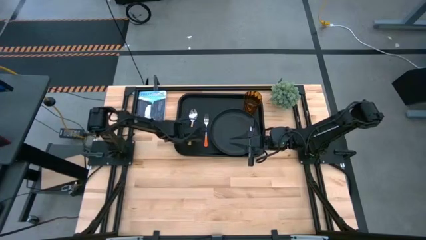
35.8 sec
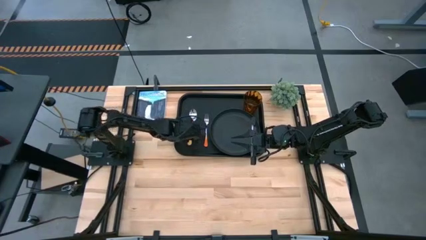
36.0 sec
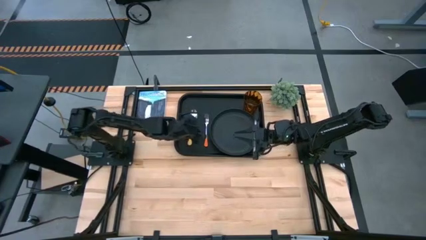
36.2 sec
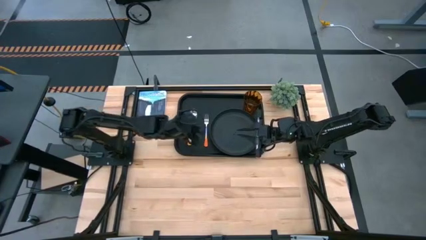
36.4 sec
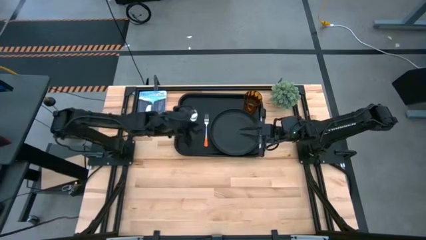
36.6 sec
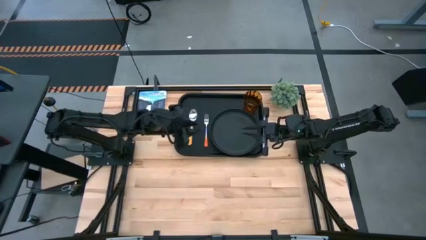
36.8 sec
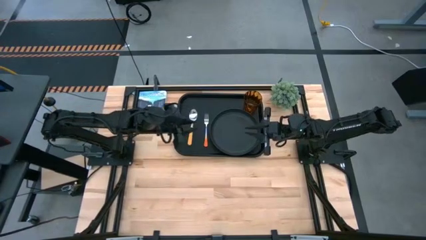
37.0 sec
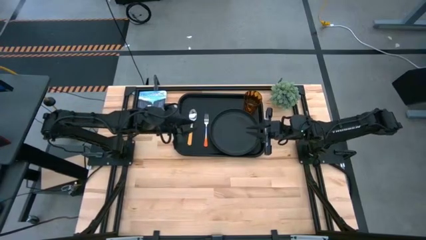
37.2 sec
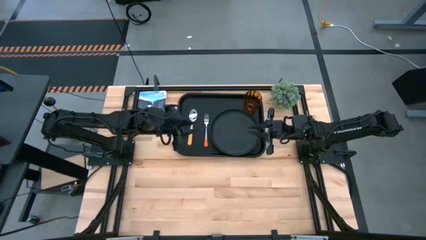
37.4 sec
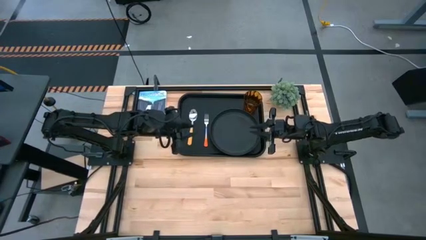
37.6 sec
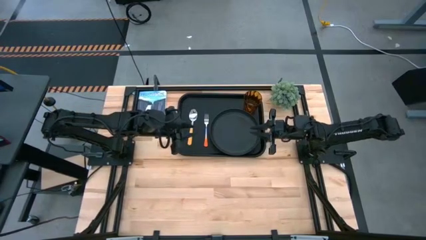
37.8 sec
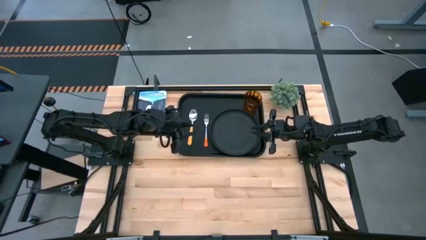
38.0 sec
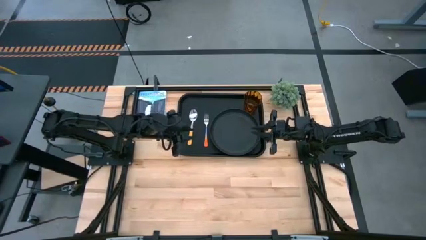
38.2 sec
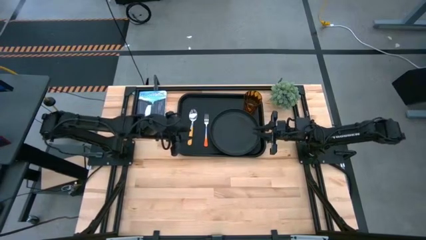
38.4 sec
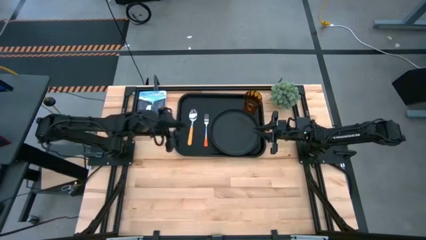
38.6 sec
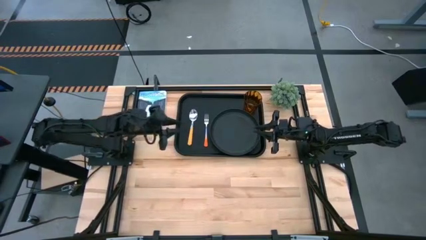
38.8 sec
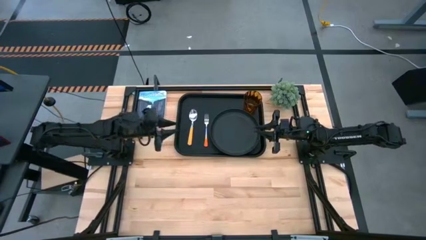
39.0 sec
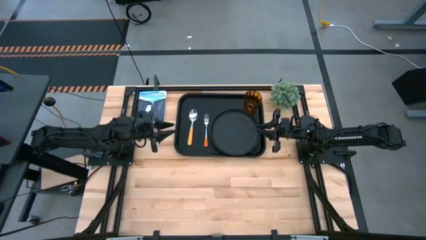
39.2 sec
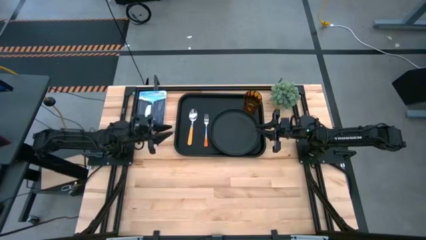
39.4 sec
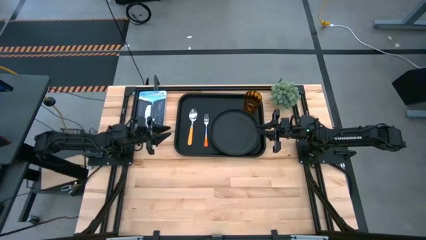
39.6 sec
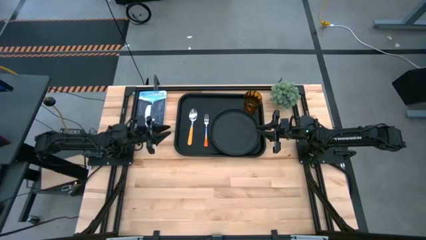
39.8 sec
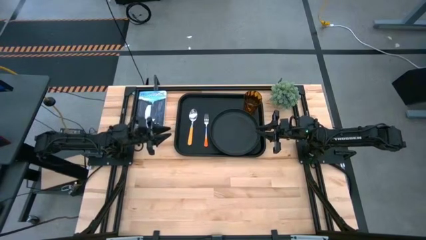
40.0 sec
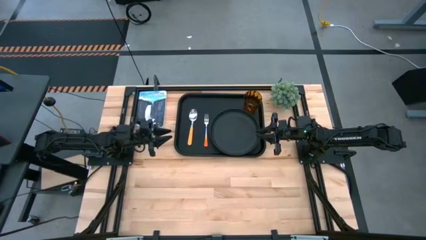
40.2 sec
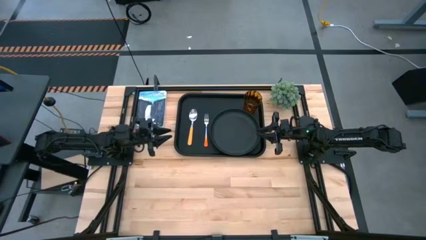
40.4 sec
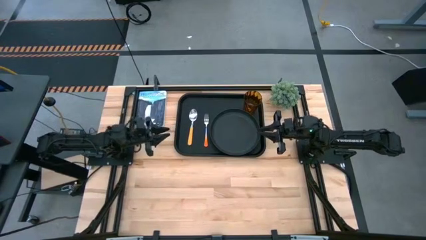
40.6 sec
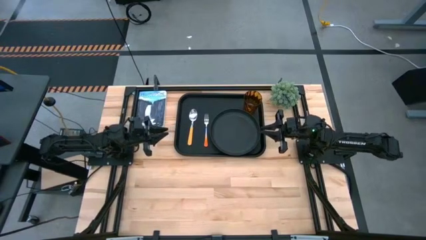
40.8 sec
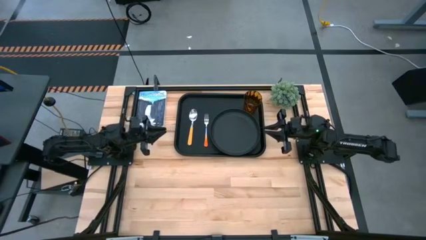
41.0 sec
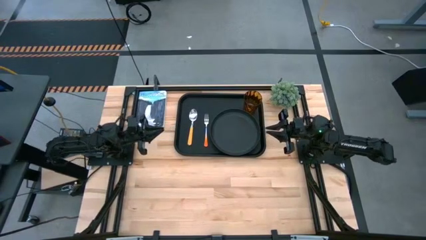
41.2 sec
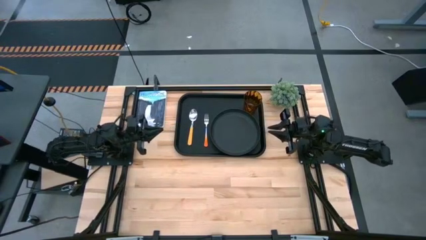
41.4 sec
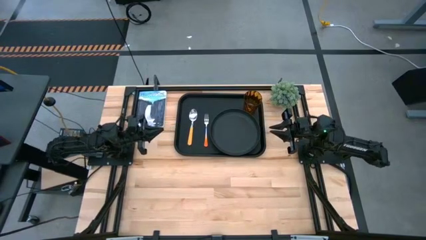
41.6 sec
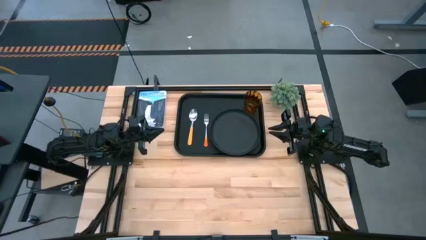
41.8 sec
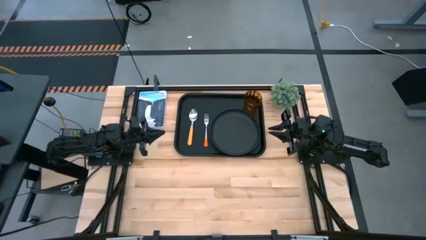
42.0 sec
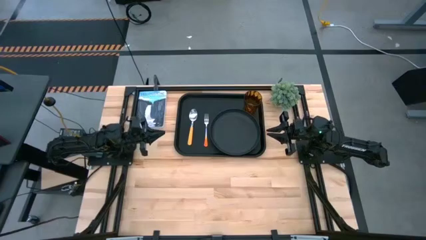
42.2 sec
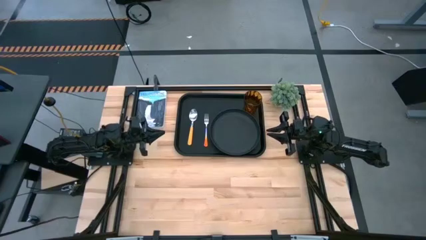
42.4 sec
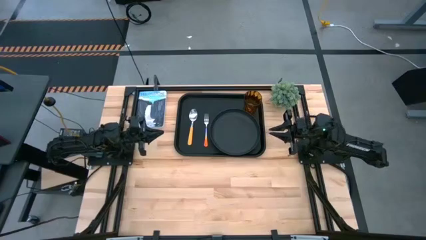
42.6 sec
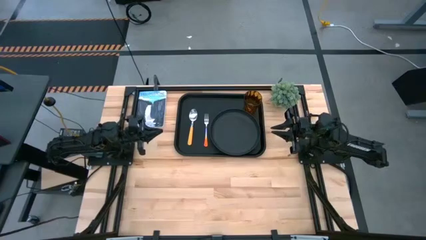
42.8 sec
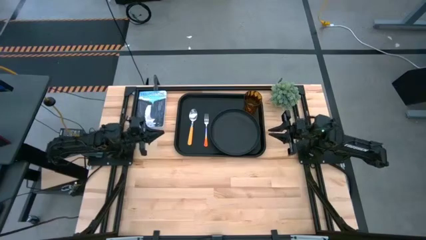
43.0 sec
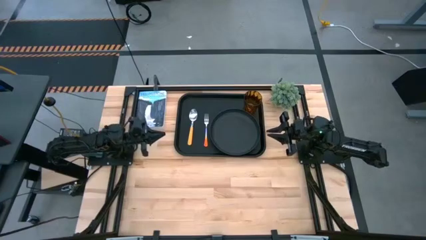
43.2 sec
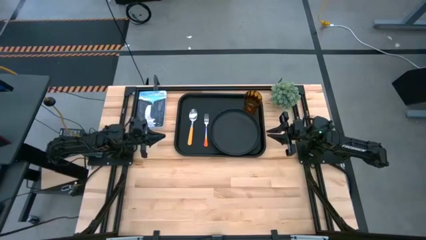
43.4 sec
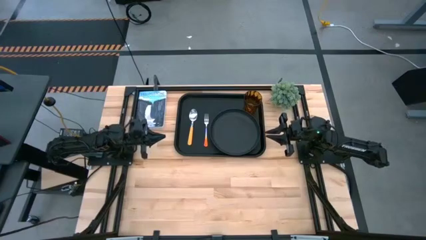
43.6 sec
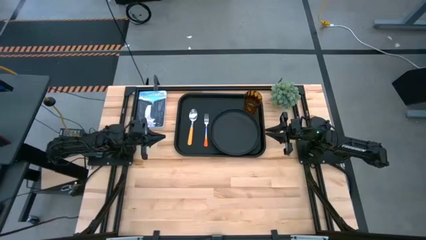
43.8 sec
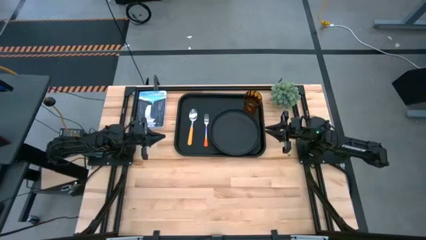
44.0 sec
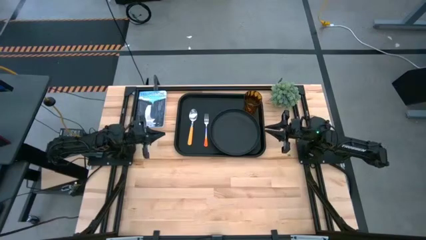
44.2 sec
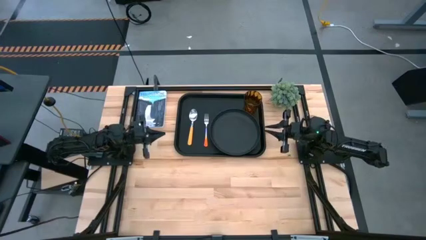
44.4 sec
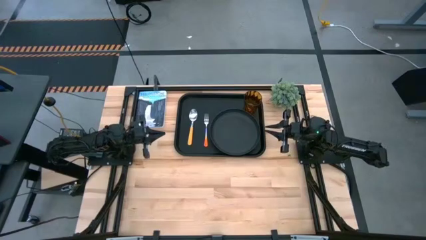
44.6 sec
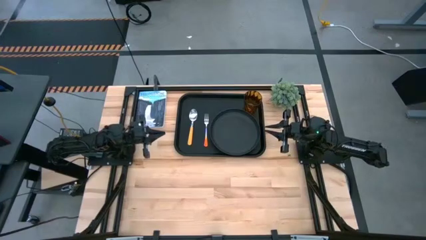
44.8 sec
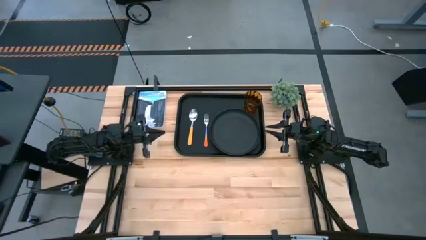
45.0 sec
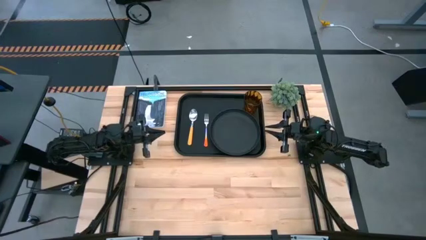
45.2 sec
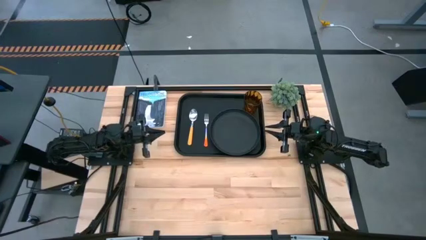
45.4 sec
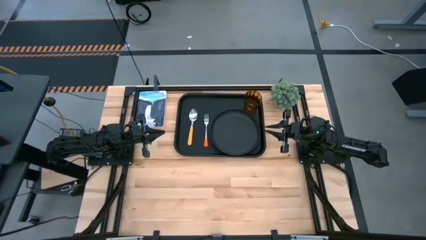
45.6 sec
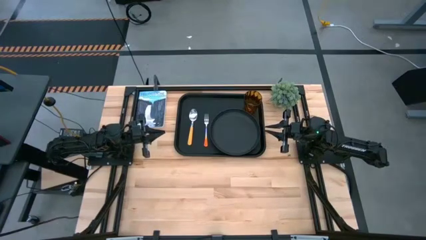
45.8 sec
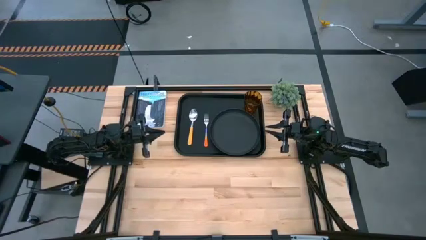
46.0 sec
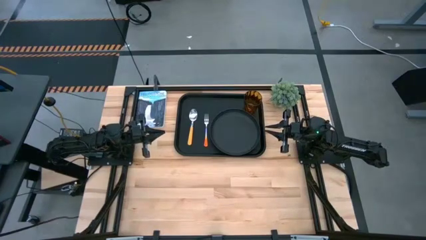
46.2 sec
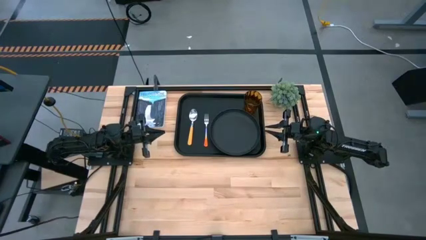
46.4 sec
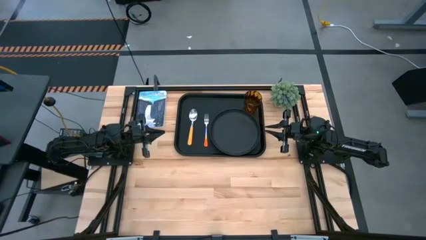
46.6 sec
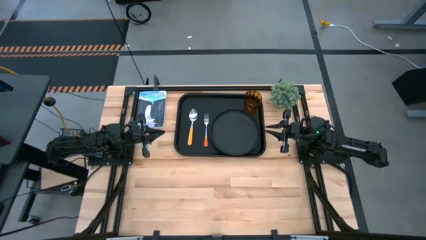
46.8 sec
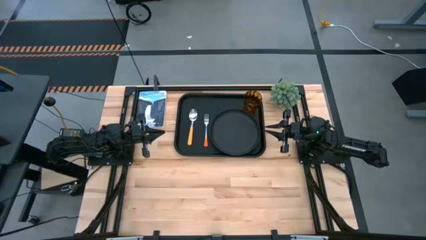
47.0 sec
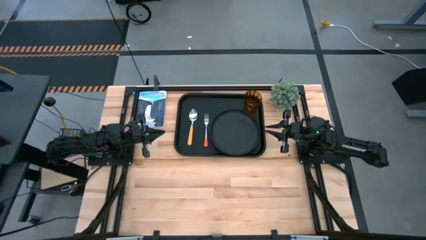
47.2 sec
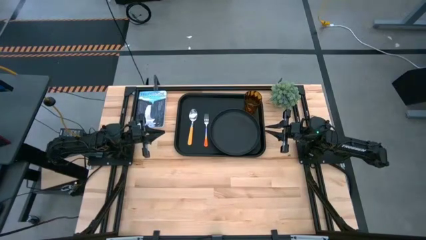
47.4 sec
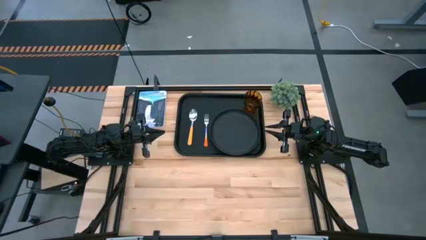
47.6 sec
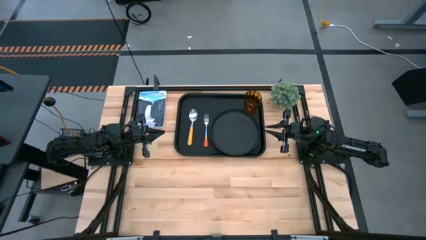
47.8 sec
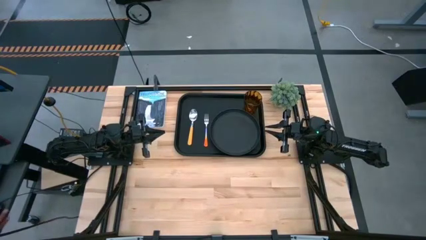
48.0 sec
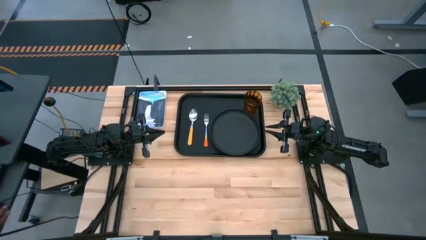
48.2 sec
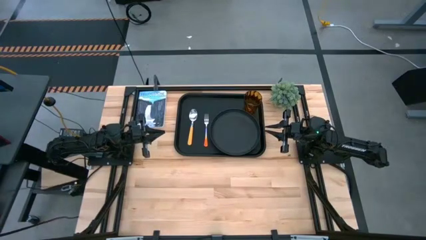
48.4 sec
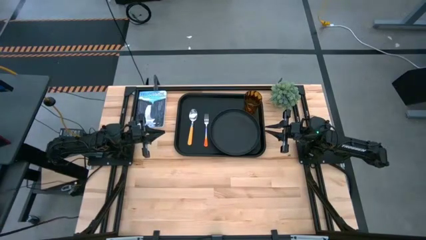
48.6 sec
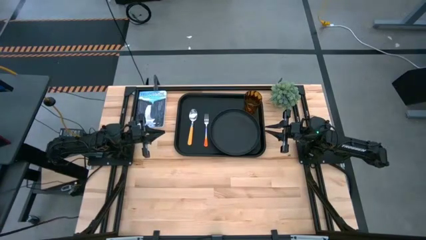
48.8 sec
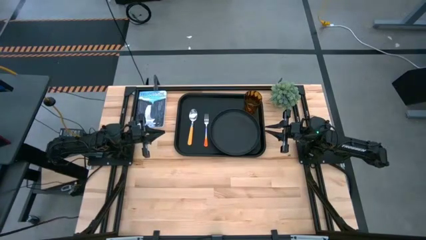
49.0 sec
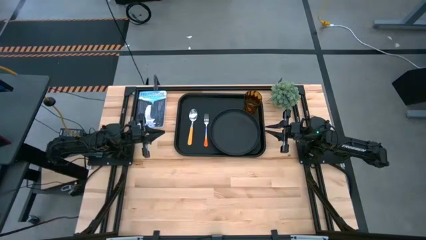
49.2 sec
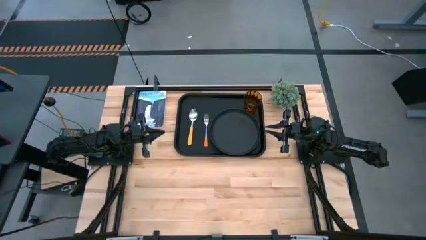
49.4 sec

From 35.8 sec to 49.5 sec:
Task: Pick and place plate/cup/fork/spoon on tray
Return to Home Position

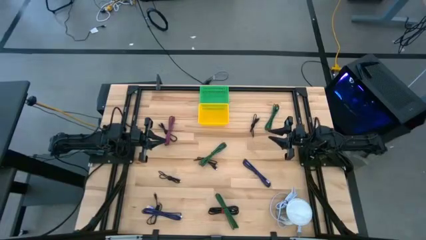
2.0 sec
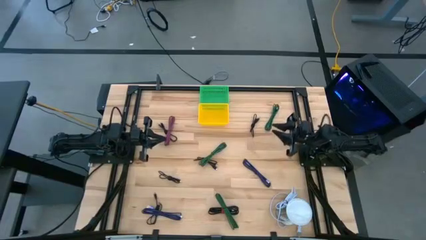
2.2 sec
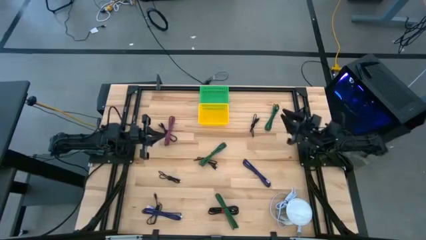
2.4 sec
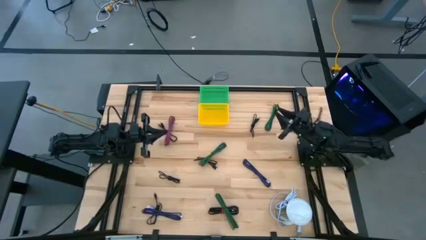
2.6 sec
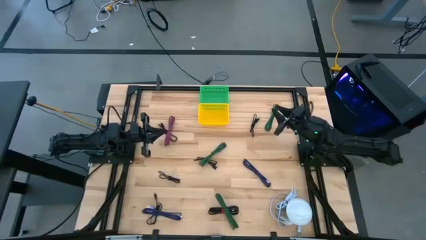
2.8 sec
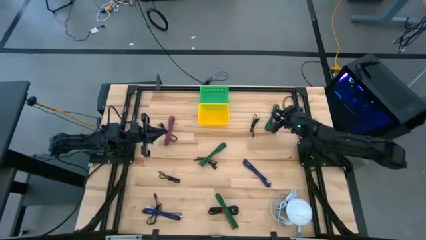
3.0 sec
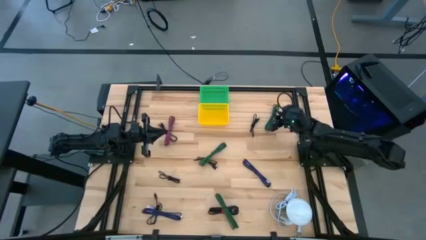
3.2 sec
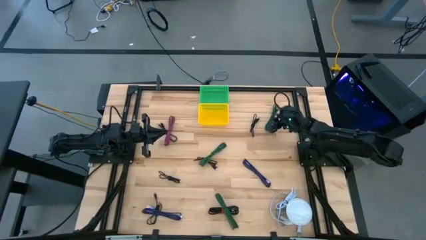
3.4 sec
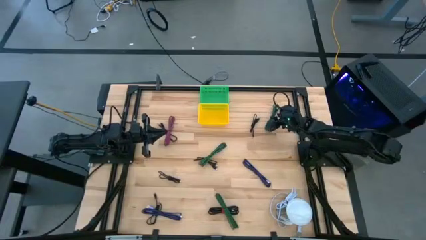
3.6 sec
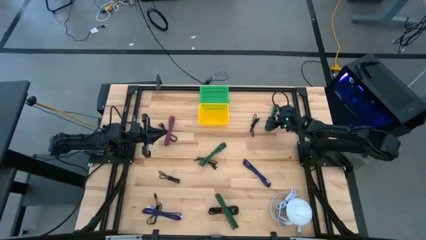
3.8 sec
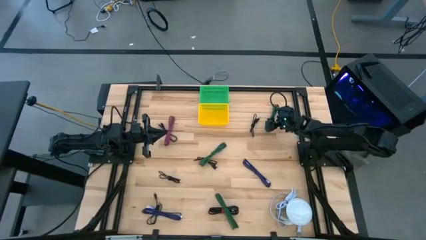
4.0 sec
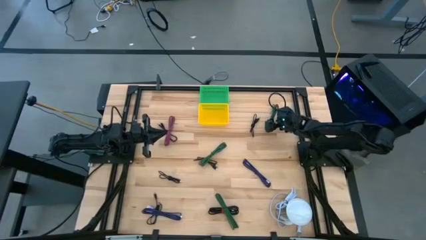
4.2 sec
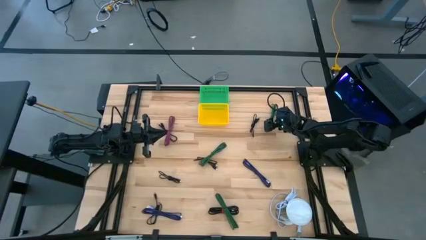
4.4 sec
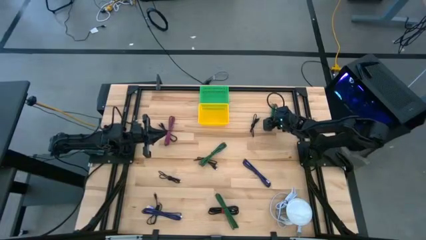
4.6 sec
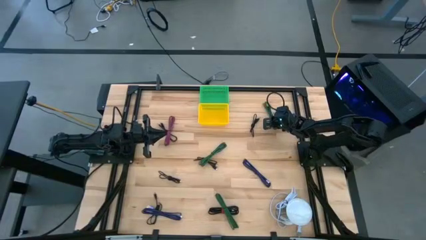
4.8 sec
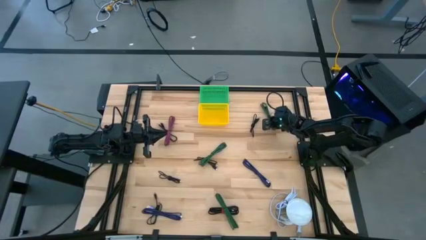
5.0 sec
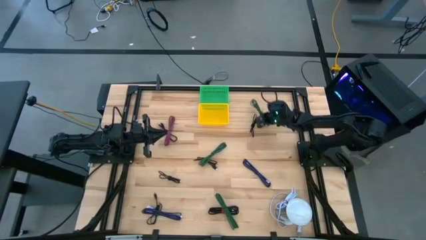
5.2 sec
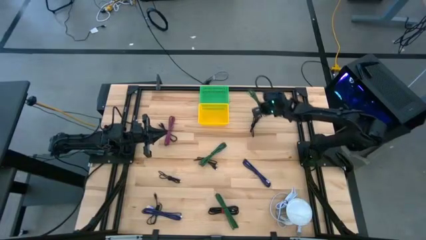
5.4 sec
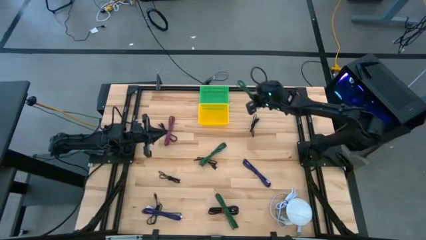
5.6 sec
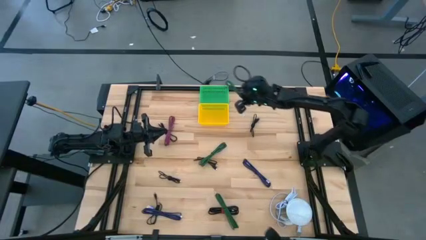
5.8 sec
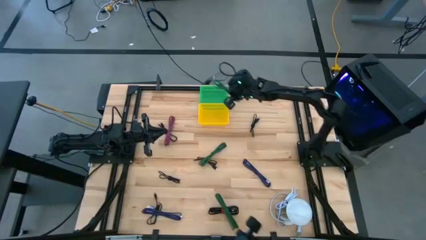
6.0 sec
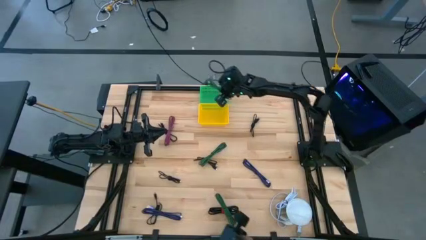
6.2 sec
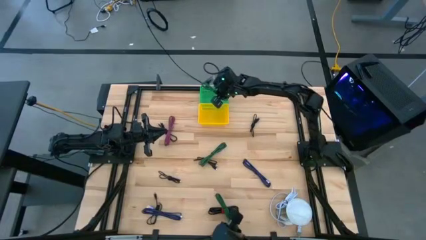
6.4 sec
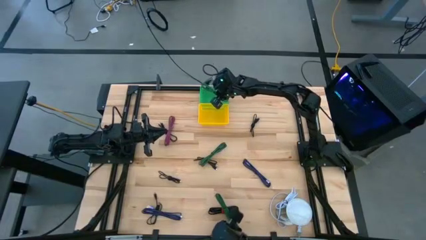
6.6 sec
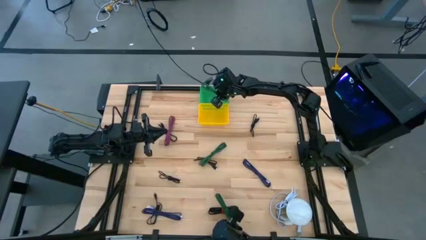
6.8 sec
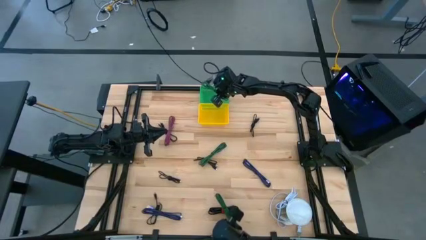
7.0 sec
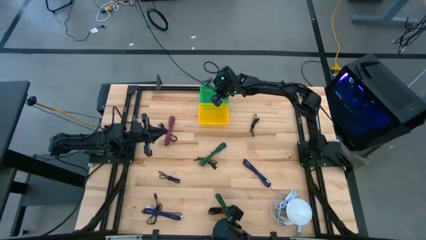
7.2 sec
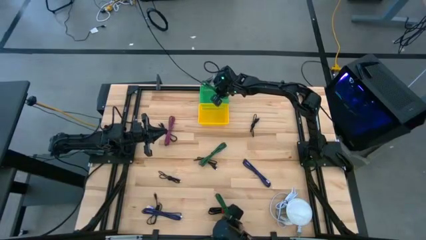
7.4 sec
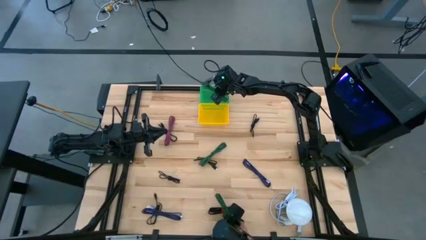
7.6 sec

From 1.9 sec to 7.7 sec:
Task: Pick & Place USB Port
Put the top-right green patterned charger cable into the green basket
